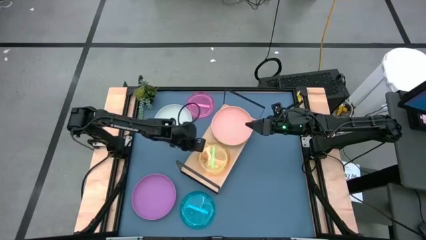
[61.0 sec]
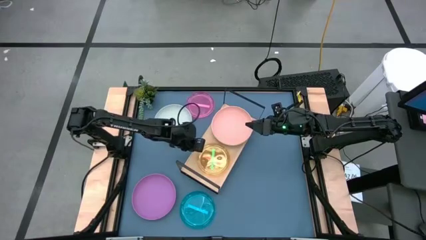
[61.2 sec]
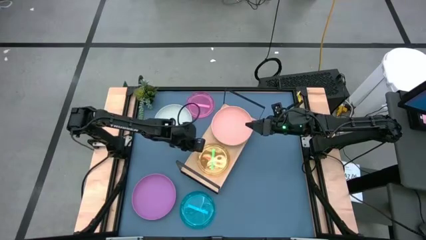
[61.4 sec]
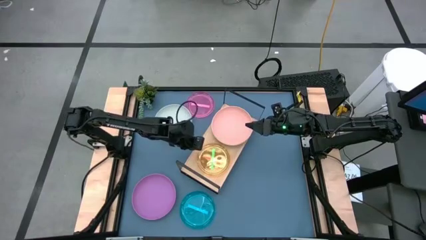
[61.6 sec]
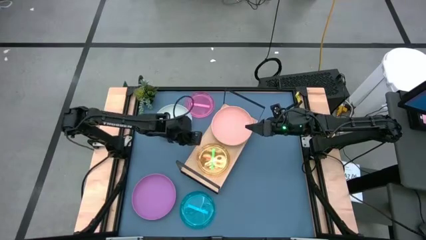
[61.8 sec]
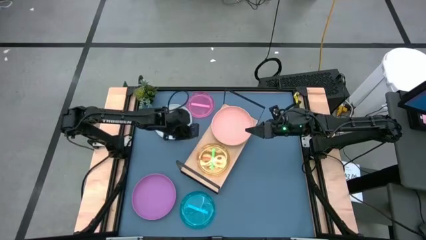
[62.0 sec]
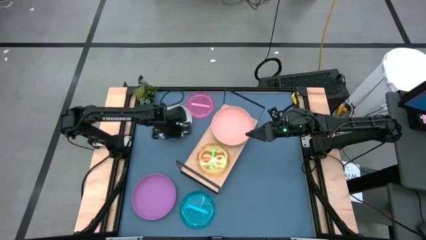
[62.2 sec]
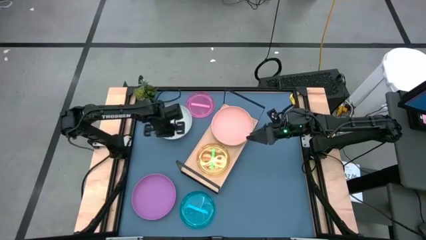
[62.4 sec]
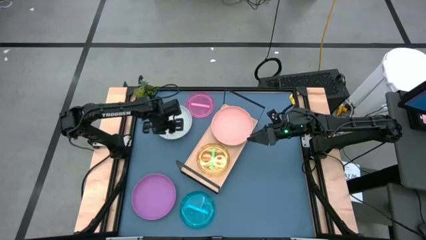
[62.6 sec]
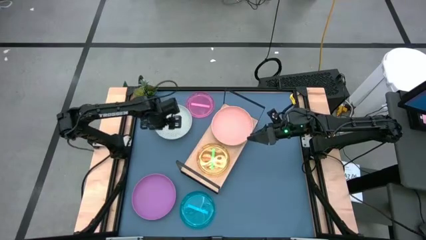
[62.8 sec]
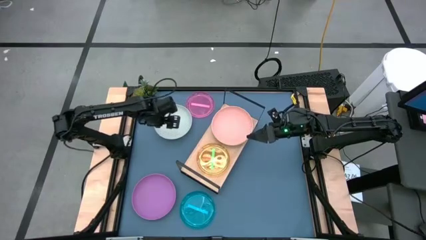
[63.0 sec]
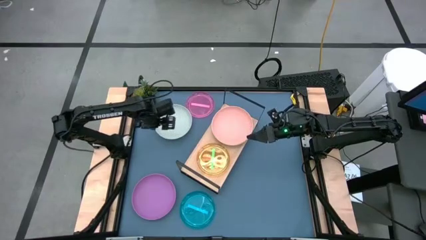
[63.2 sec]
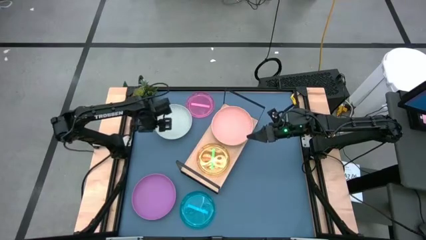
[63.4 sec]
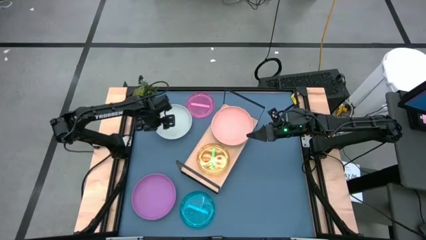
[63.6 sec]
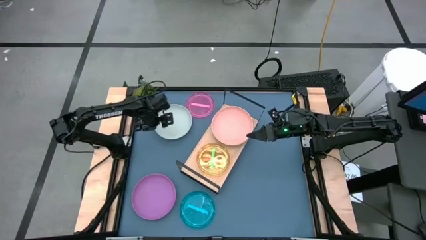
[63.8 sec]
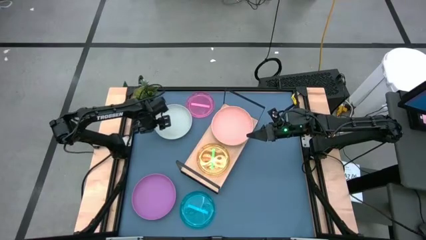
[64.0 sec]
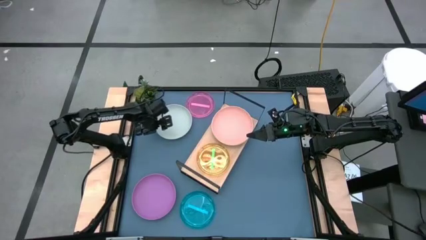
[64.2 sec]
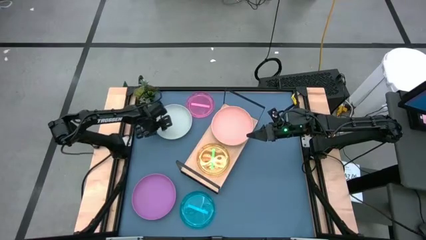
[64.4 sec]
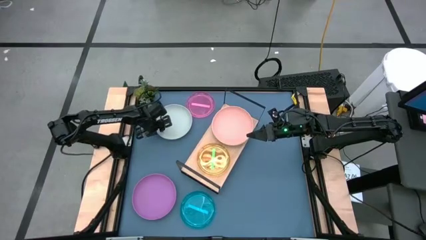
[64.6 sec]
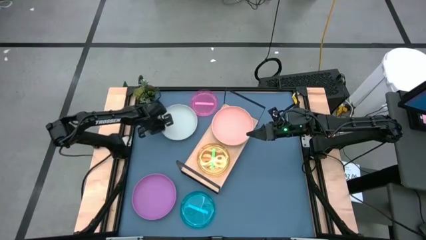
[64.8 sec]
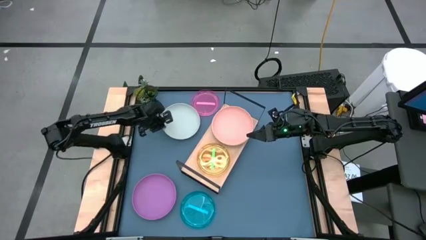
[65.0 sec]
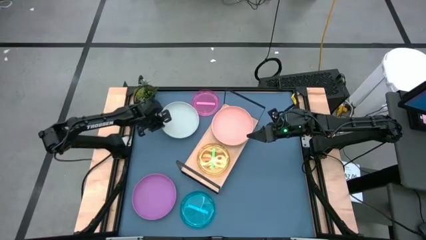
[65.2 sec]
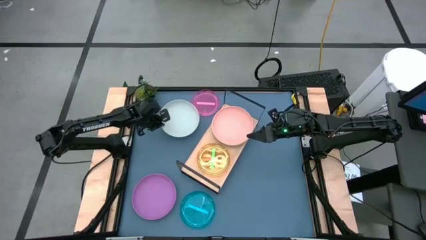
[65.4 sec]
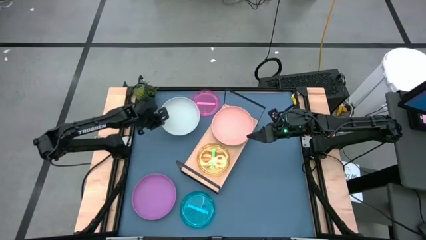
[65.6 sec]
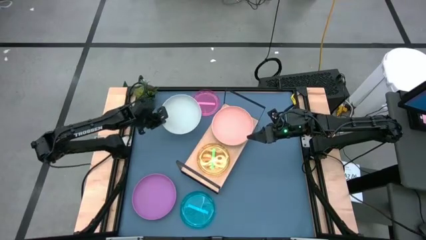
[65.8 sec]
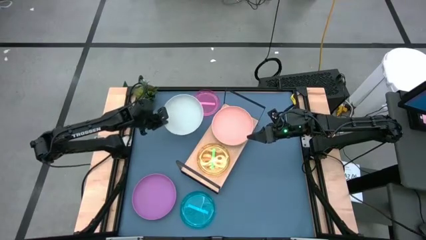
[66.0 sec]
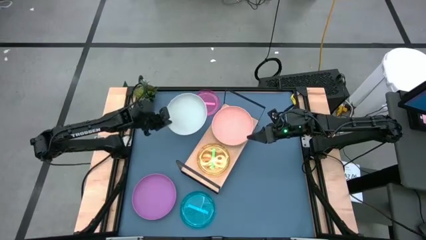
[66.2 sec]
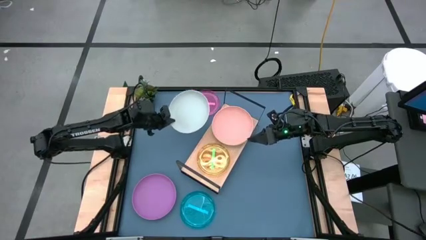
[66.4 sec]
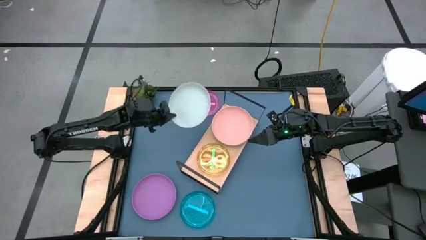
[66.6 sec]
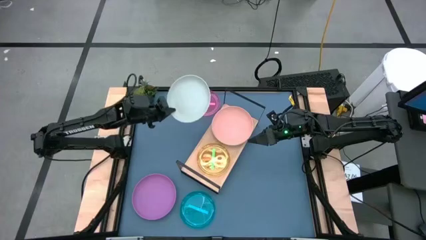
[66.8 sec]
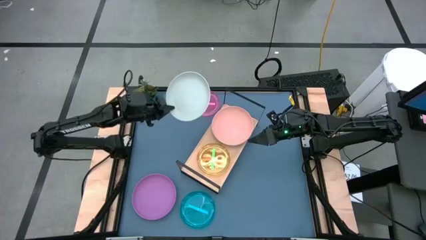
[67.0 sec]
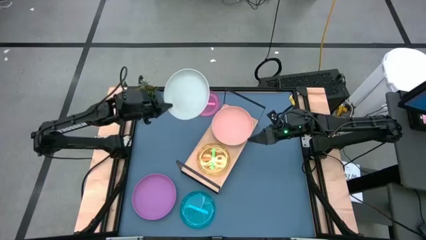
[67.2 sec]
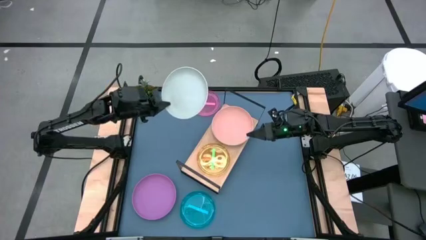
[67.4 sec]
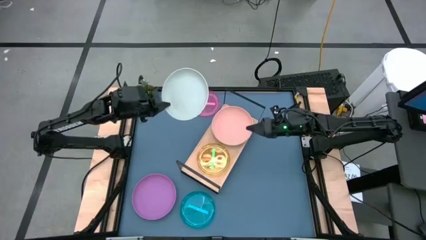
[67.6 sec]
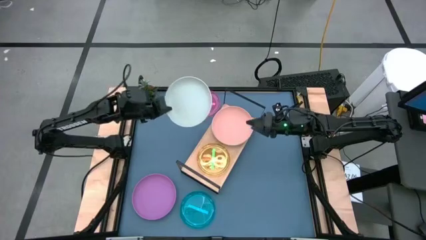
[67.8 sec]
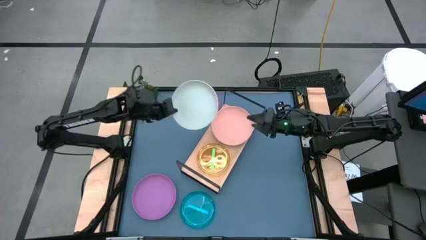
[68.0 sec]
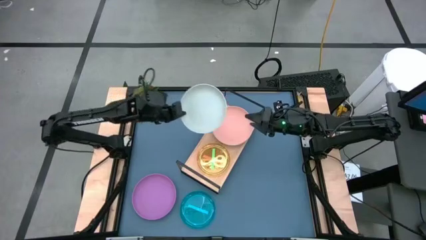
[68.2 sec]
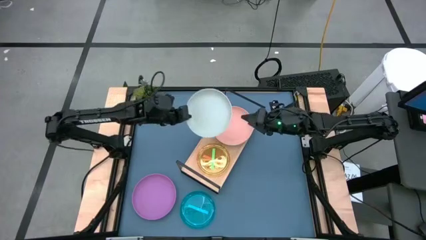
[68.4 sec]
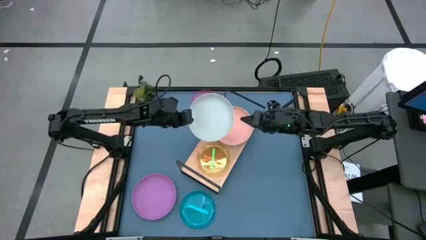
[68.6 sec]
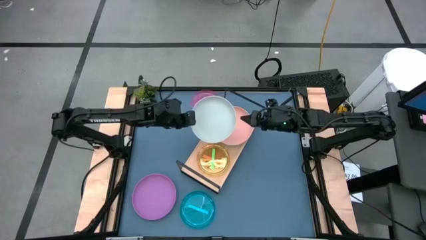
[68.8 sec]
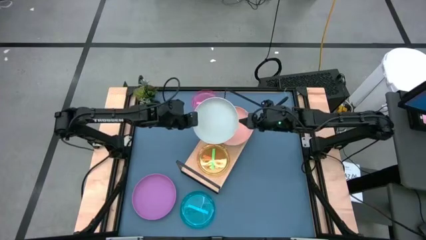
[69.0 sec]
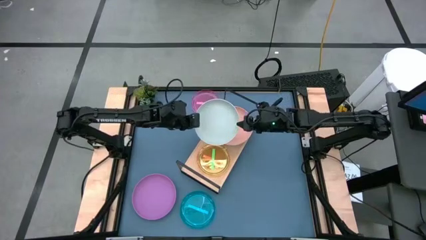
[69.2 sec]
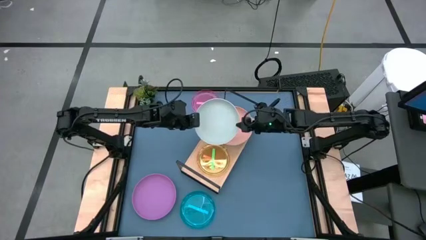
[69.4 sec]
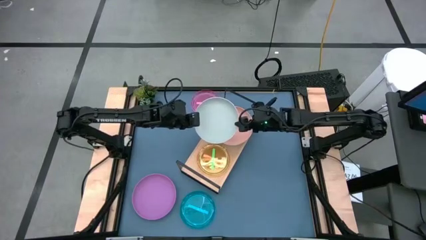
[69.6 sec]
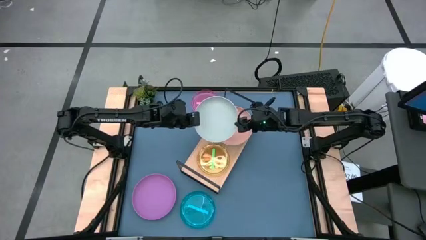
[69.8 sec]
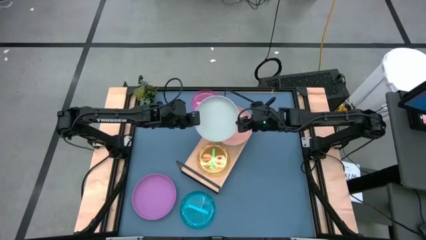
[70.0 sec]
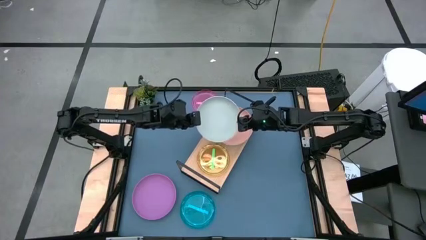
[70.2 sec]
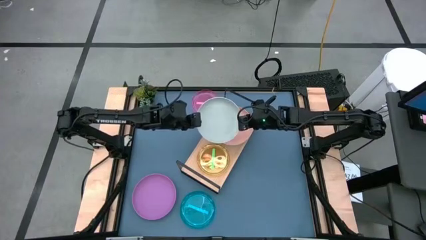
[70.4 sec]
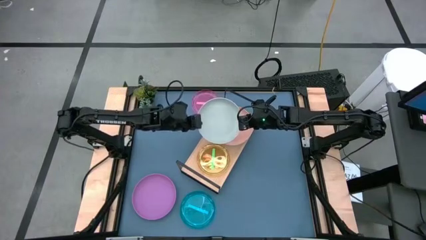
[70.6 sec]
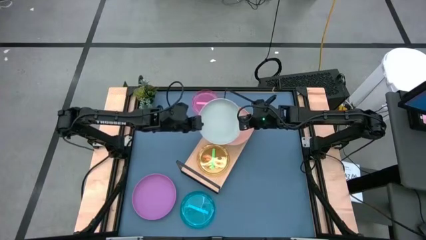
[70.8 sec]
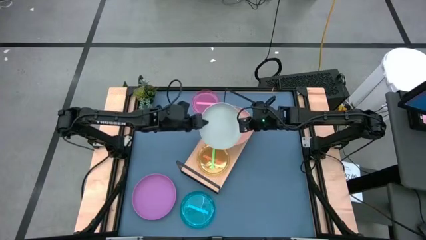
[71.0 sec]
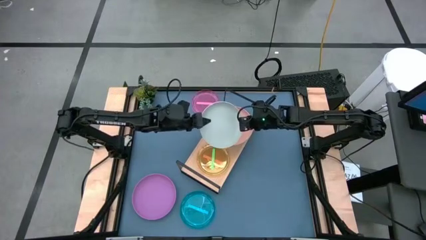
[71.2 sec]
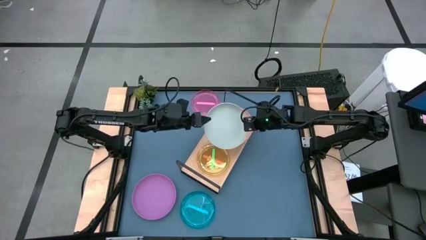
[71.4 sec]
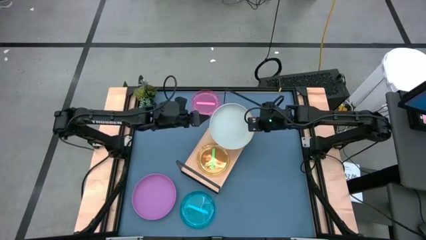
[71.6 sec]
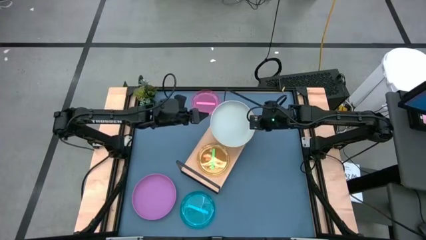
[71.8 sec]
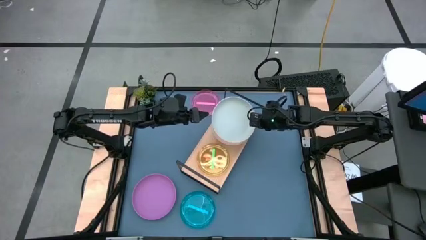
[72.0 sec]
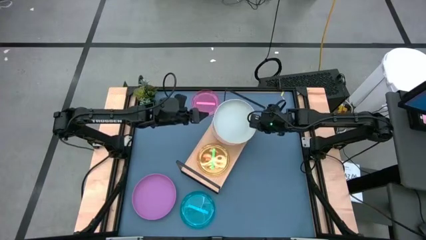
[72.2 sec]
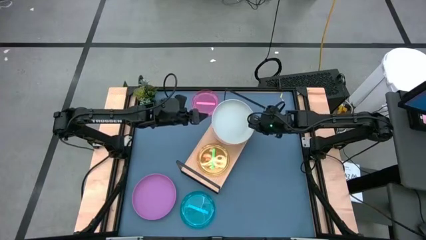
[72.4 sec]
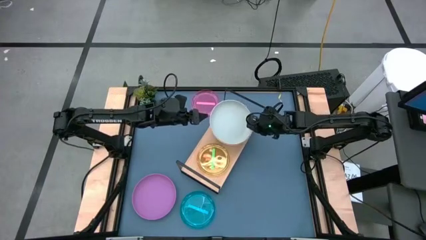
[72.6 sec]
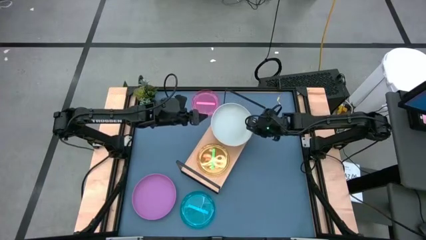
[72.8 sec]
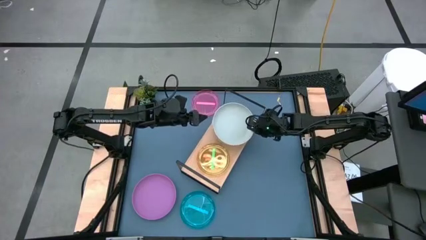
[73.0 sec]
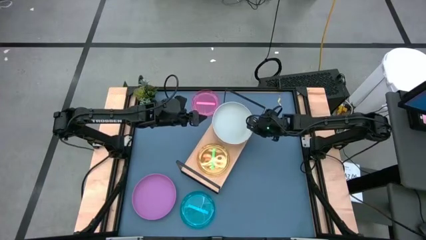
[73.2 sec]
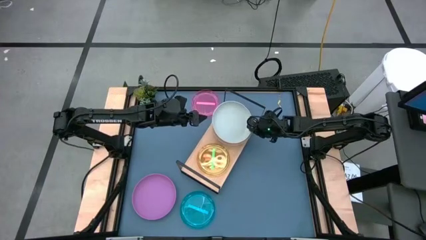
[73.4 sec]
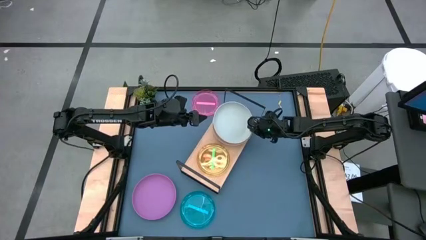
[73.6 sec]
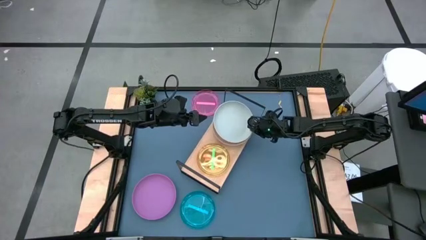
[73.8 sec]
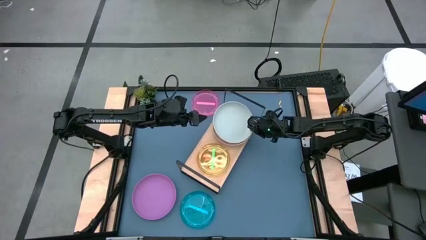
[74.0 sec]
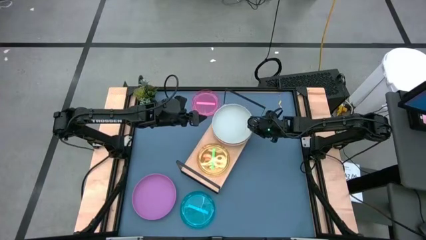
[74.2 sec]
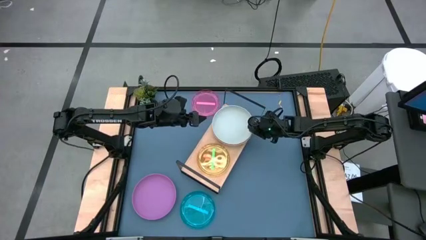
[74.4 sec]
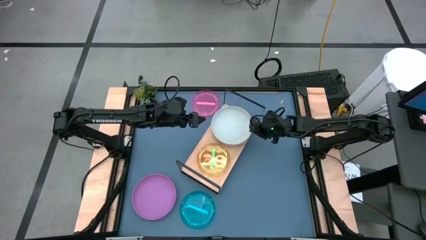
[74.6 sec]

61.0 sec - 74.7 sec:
Task: Place and stack plates onto a shelf
Stack the light gray plate on top of the light pink plate on the shelf
